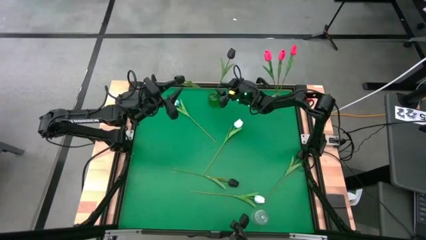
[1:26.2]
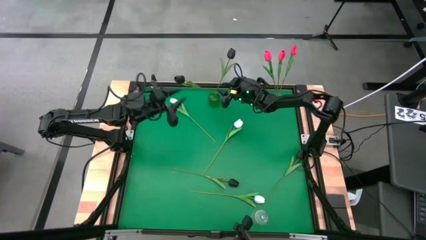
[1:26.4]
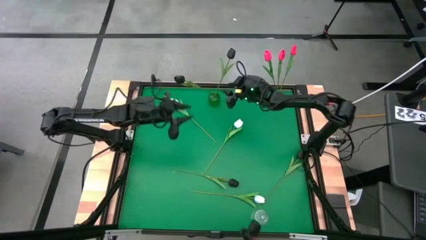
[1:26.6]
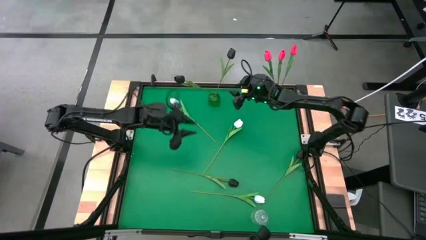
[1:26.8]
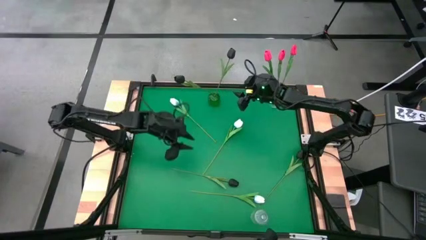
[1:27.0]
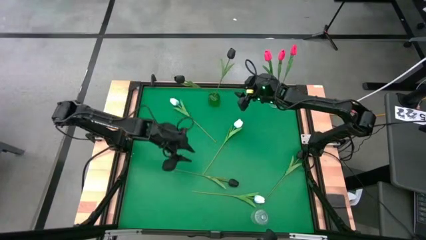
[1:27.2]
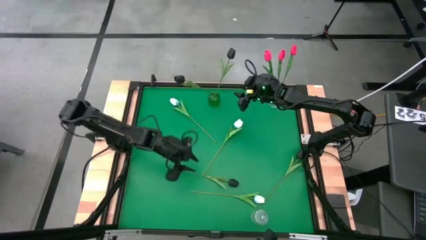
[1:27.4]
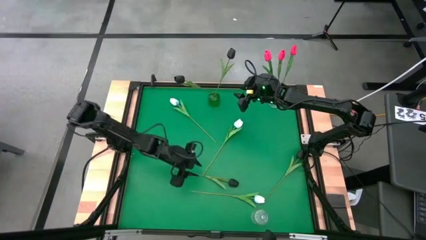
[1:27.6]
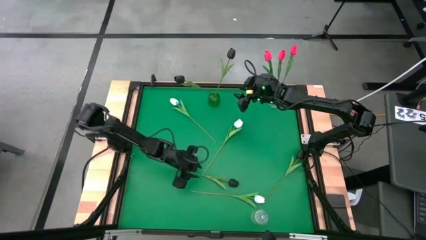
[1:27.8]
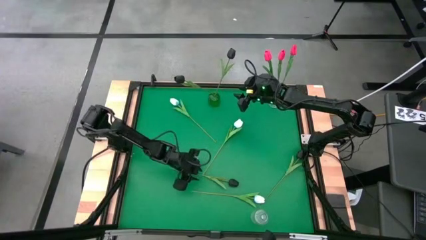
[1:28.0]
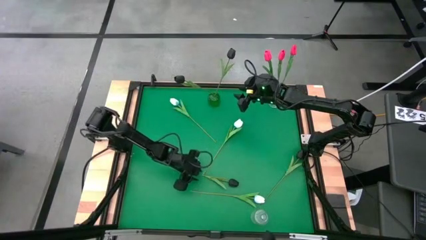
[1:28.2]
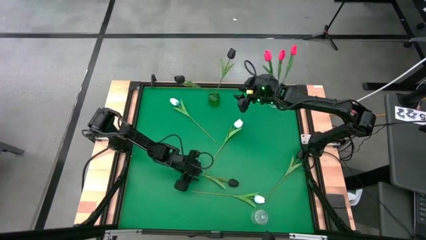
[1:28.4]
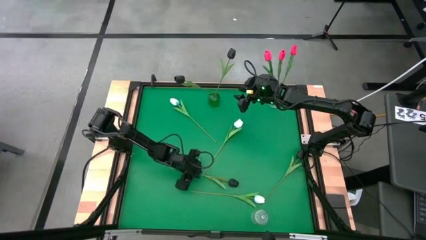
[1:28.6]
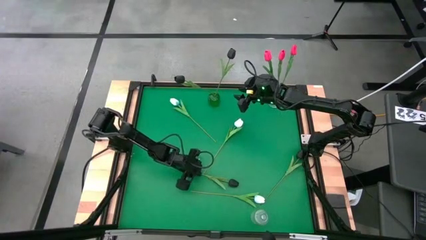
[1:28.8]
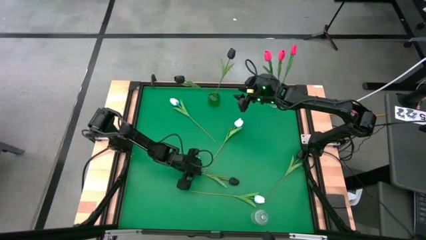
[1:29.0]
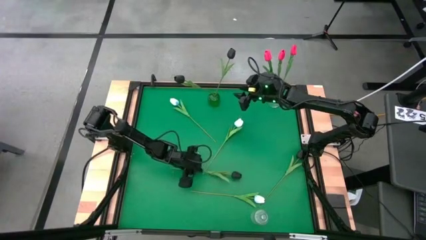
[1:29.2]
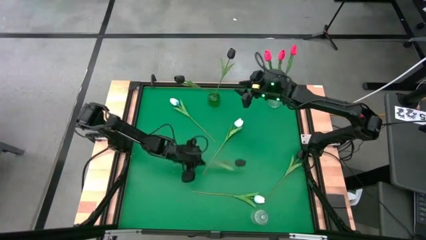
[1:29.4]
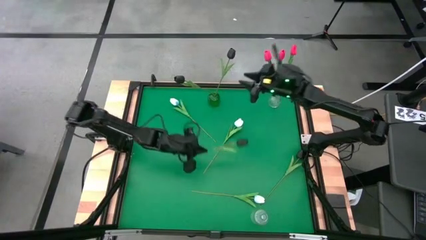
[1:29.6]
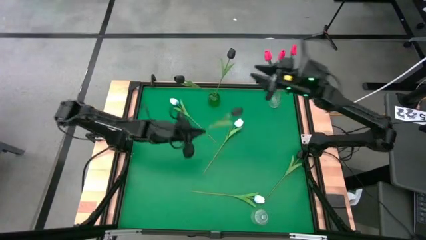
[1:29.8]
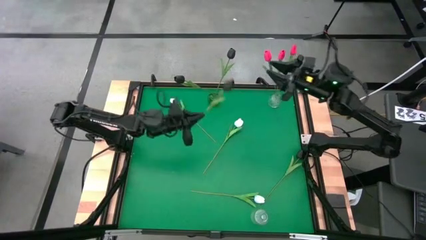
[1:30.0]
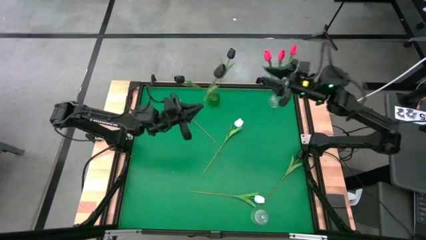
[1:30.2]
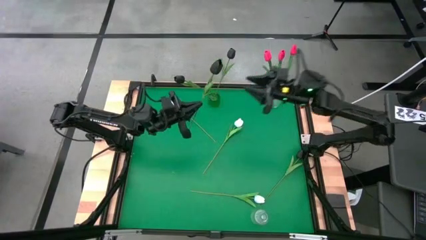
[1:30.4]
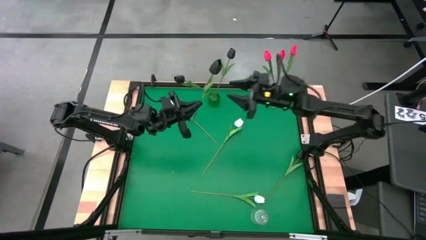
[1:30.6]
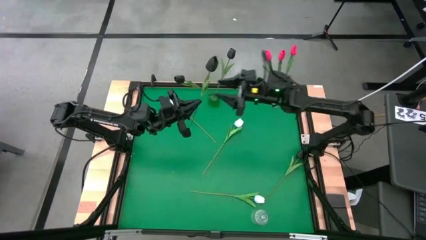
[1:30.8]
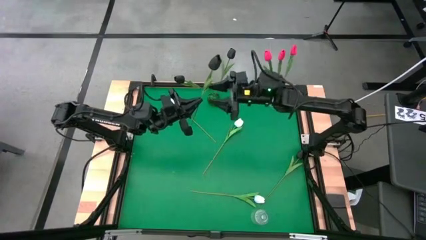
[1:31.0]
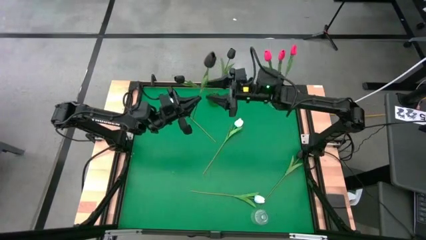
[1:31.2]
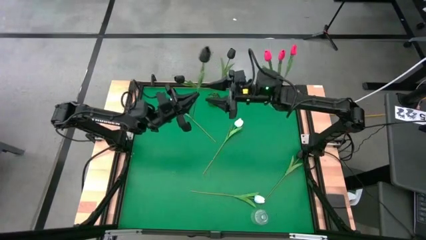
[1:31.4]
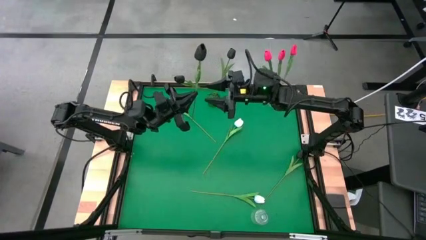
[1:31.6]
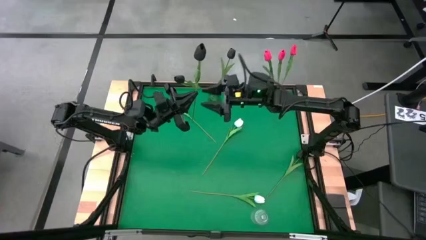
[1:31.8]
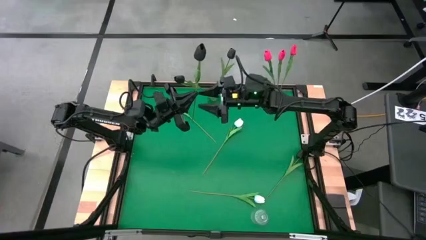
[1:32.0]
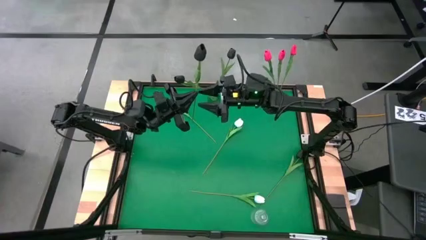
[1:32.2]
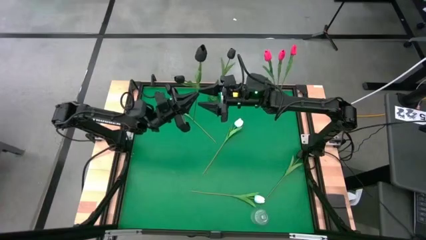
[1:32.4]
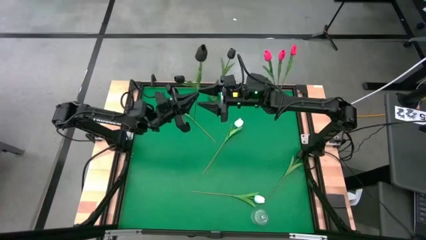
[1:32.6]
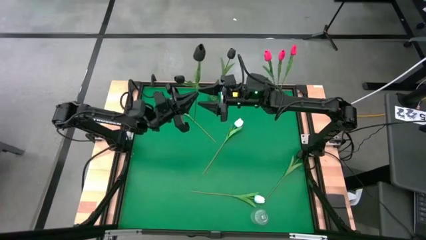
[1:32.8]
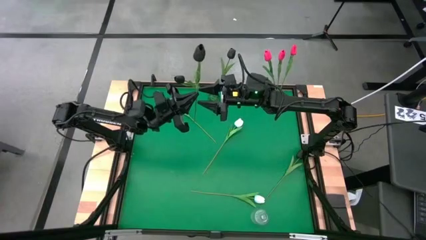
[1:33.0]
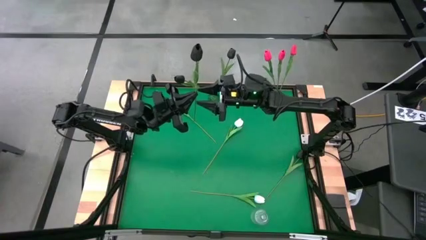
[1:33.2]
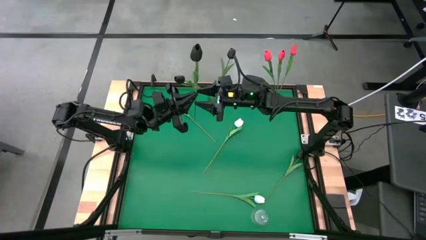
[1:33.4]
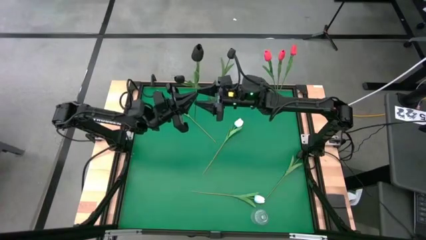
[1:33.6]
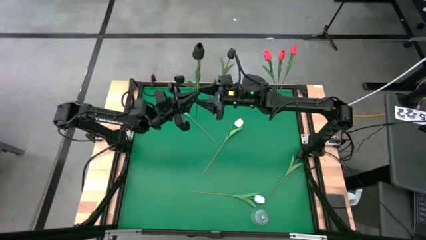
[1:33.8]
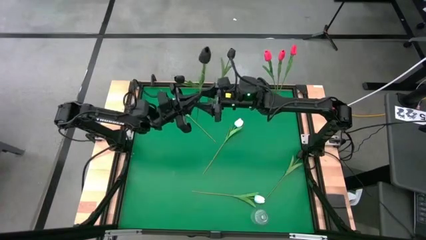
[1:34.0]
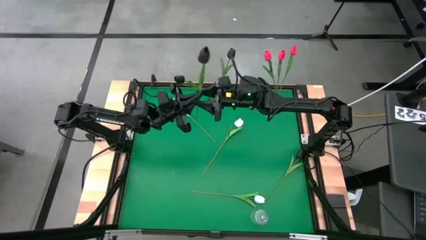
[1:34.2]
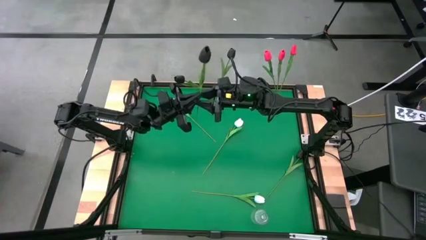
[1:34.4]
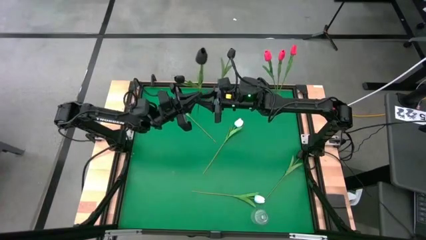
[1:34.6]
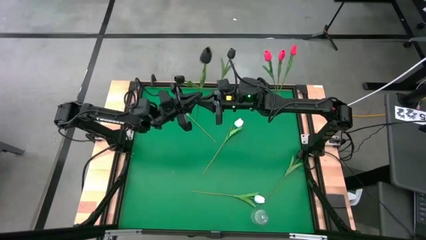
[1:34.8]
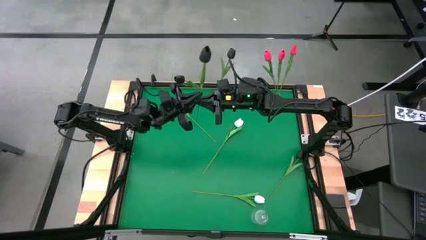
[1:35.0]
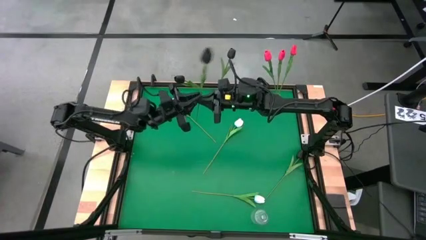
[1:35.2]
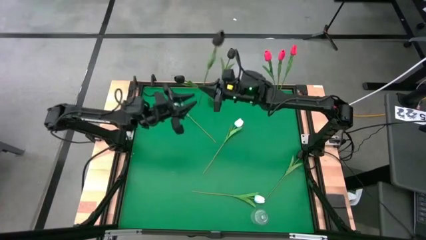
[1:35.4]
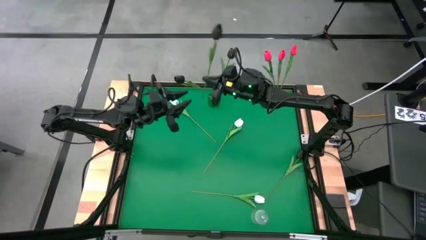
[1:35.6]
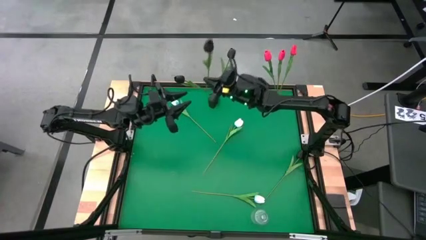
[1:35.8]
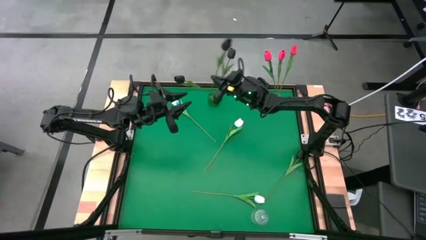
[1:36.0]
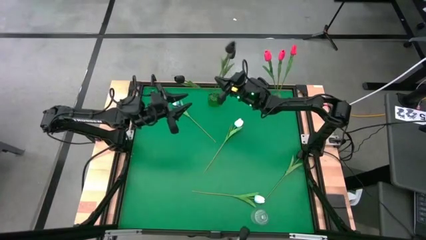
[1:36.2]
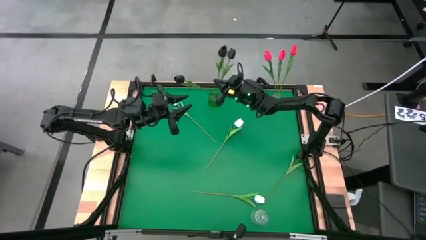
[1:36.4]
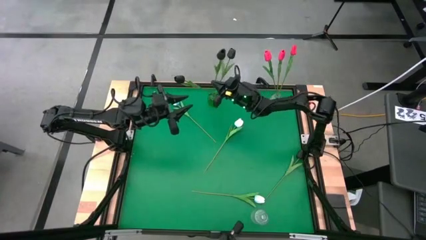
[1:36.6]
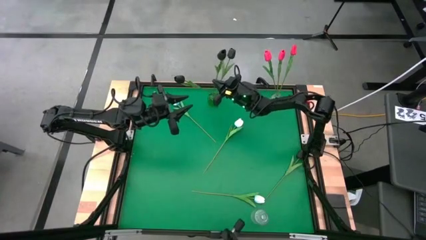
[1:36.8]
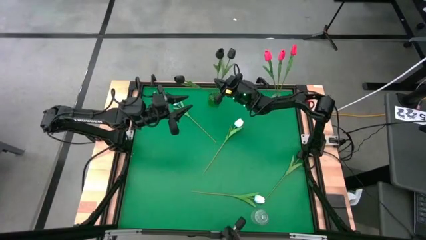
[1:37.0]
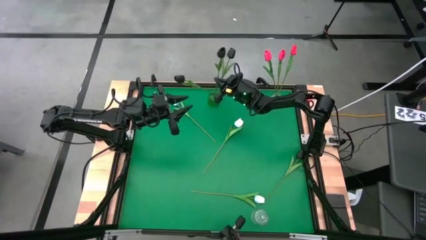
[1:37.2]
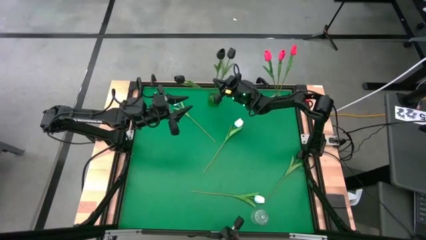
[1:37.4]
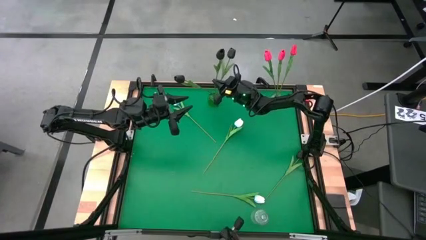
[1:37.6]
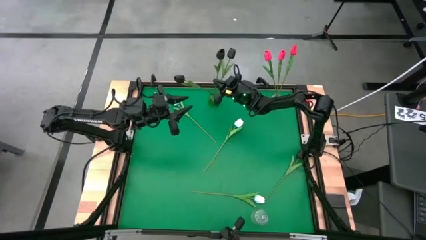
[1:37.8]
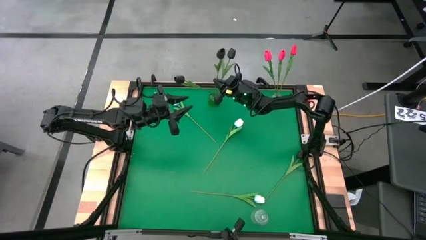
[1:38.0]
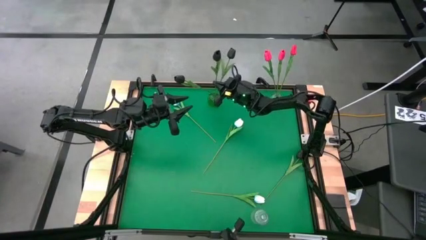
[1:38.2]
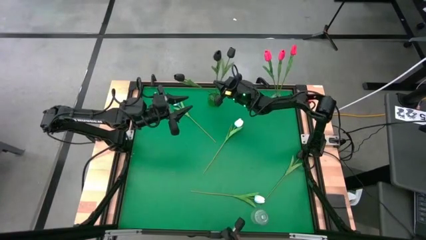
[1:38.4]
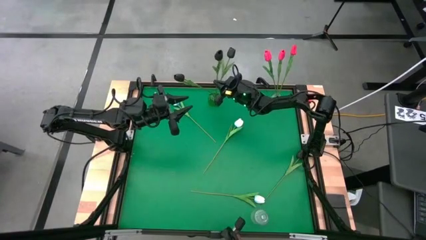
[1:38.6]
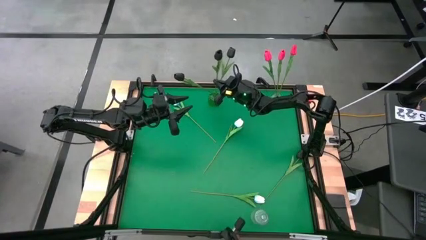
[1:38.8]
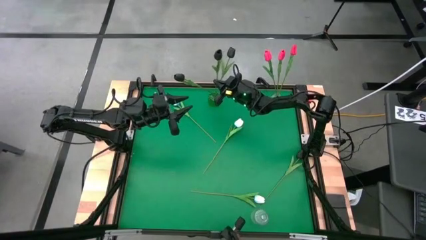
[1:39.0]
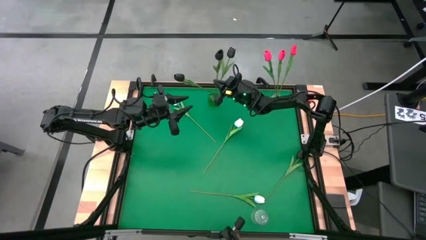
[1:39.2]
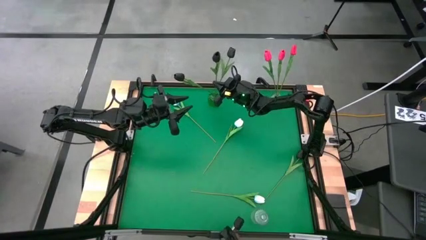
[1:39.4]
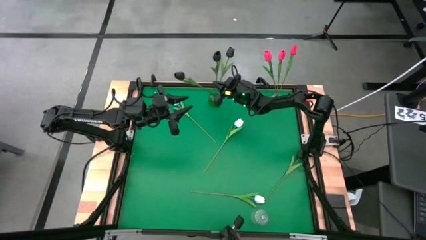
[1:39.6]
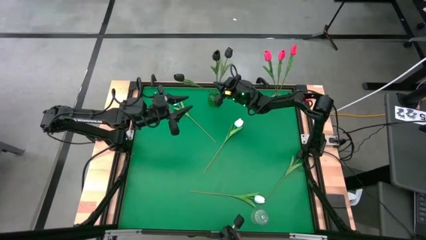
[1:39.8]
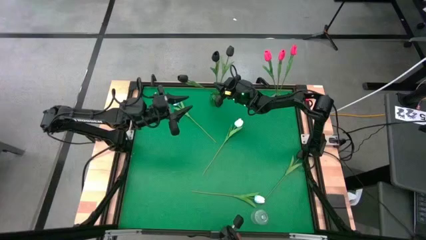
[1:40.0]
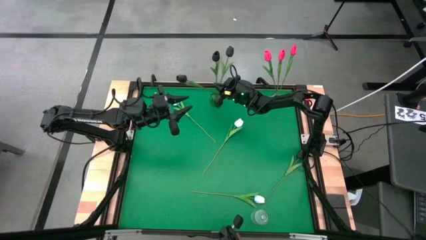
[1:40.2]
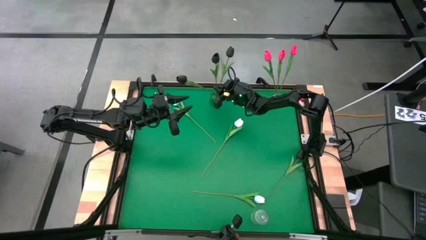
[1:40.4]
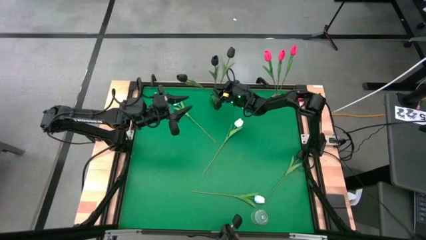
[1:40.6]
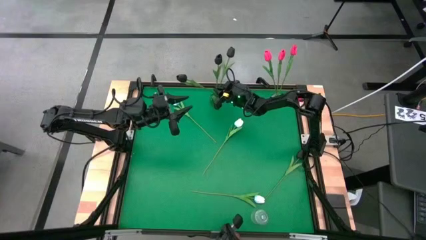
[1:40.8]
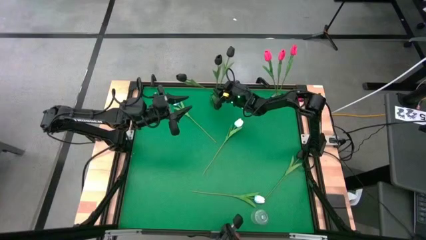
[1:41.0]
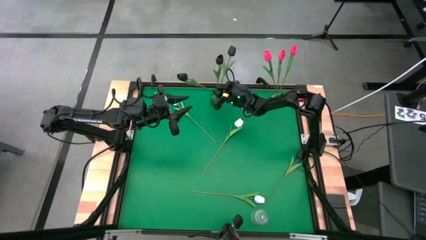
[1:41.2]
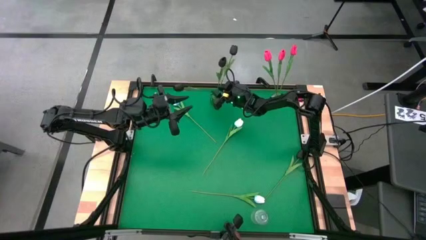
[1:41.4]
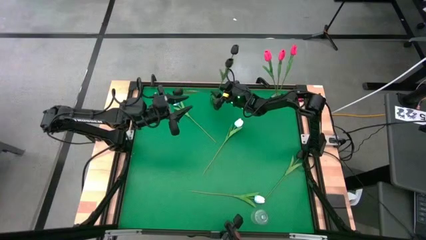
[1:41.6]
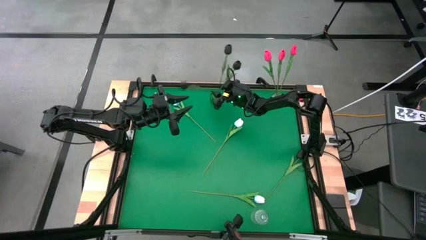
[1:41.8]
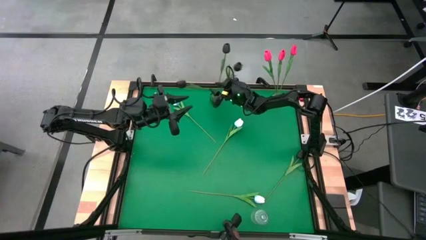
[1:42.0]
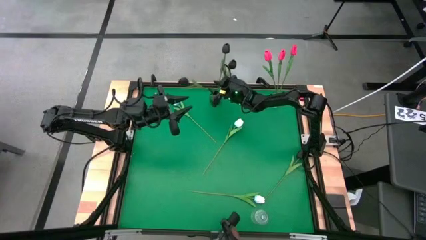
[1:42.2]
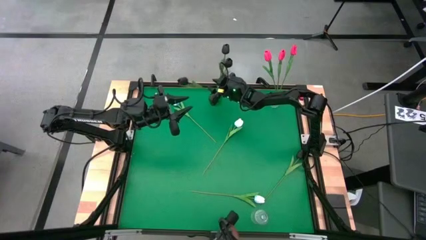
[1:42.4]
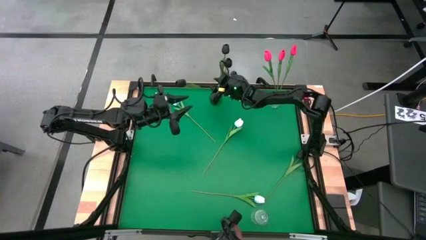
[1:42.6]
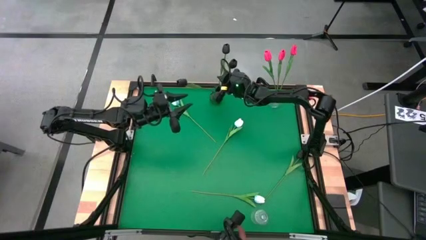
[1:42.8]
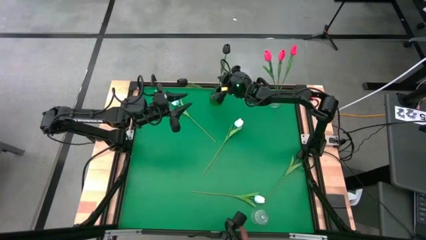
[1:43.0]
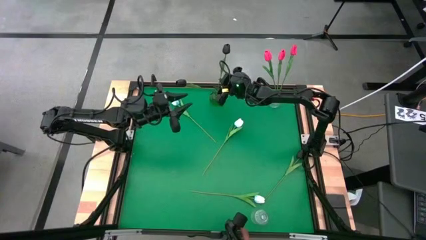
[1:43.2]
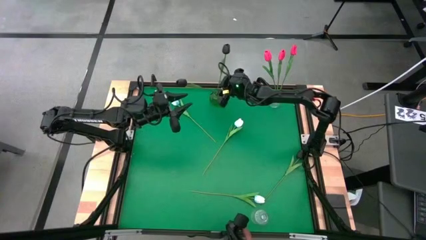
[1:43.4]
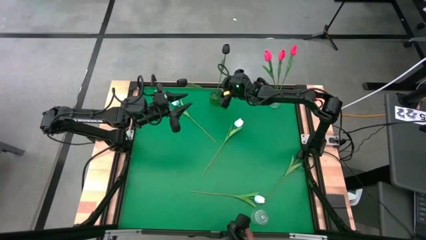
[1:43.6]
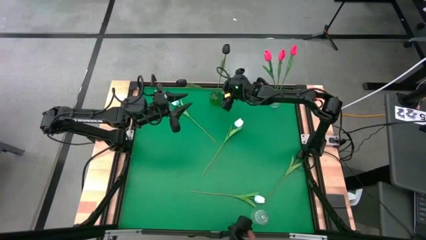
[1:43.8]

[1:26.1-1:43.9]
Task: Sort flowers into vase by color
Put the black tulip into the green vase
